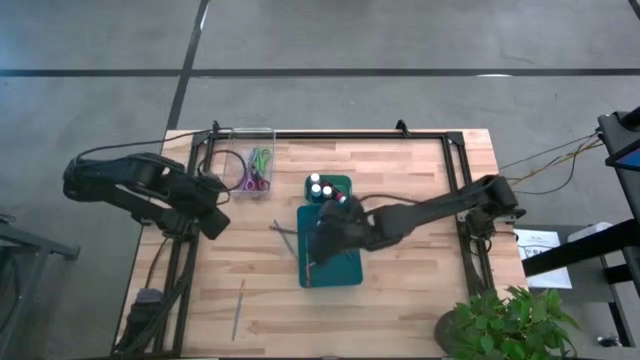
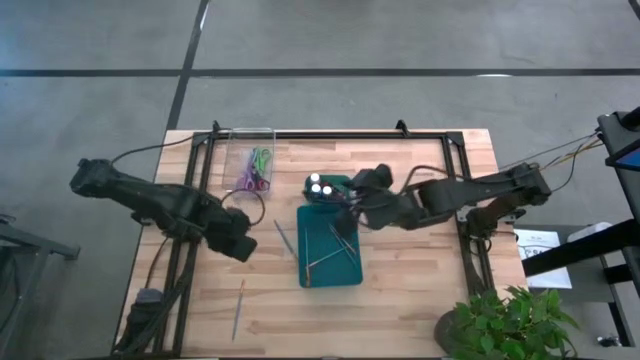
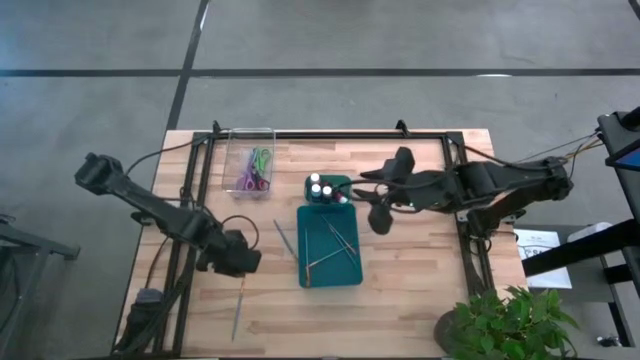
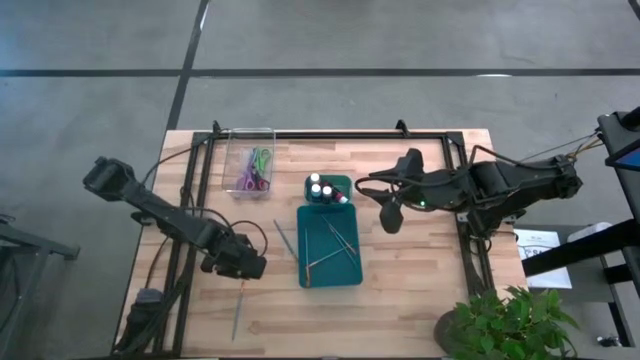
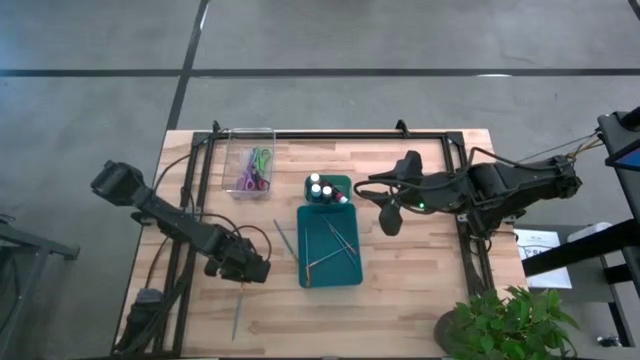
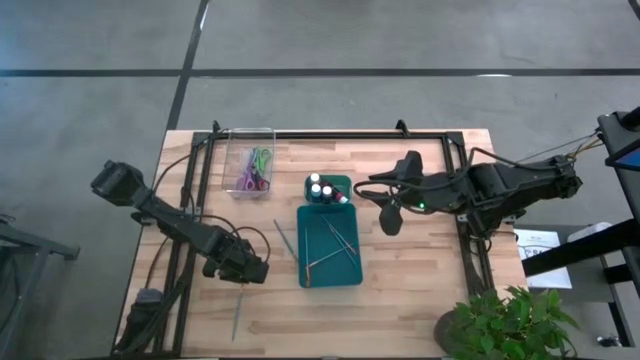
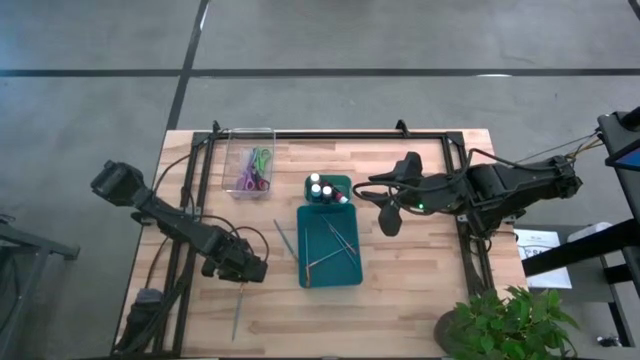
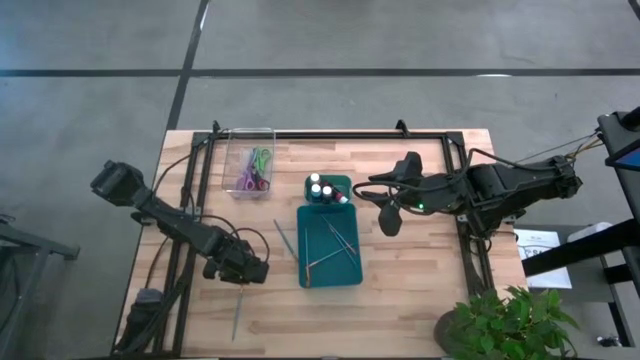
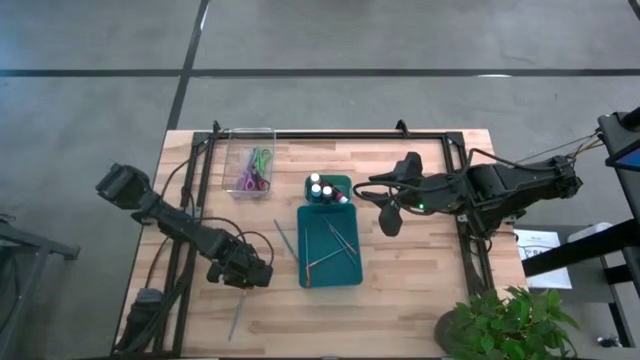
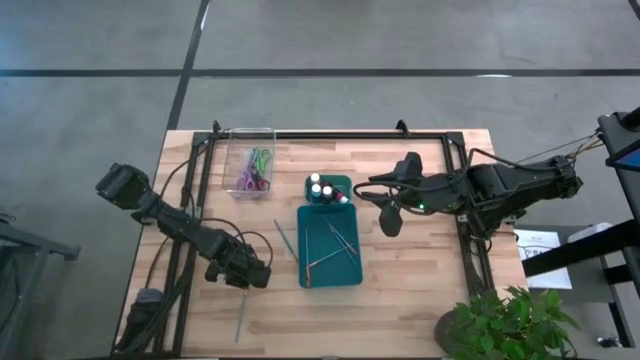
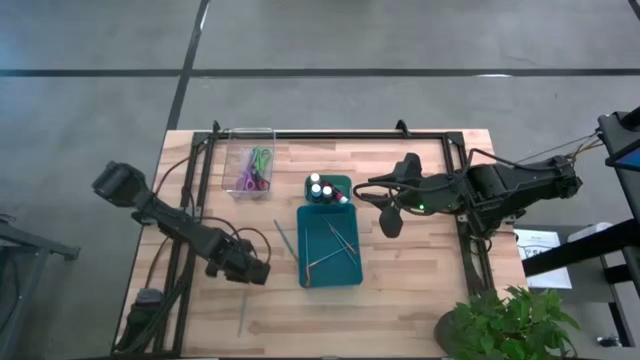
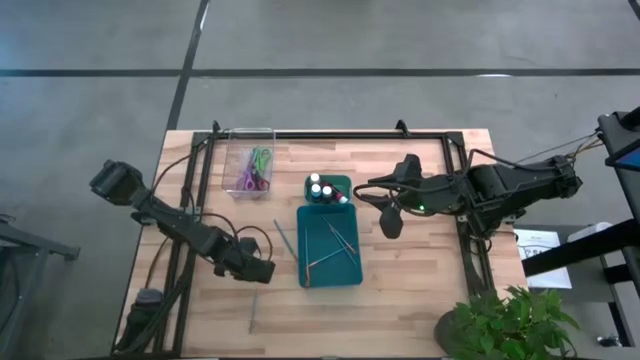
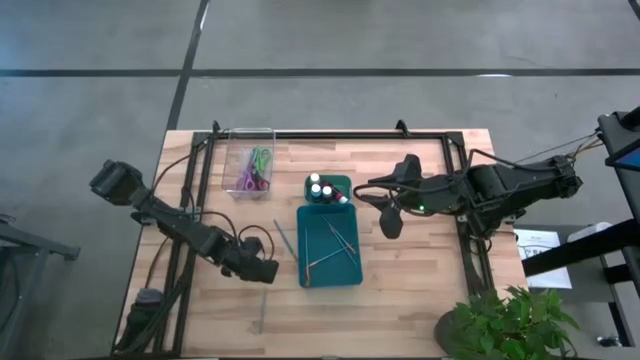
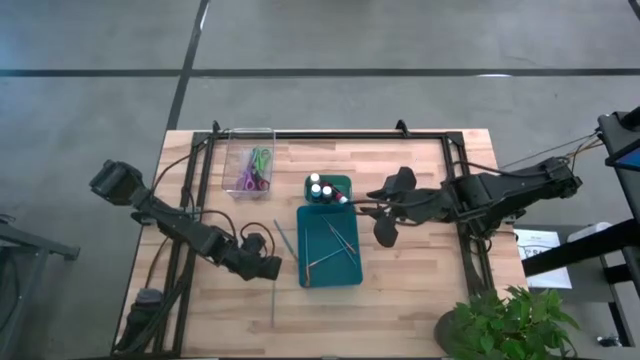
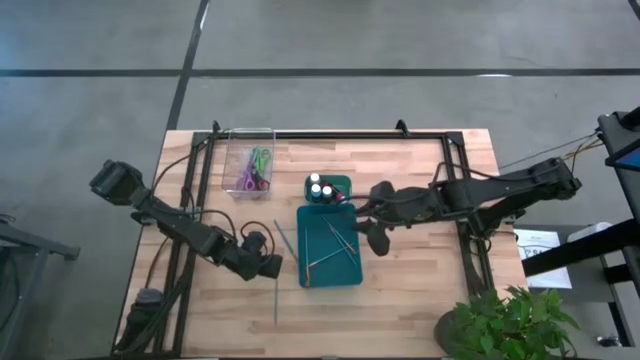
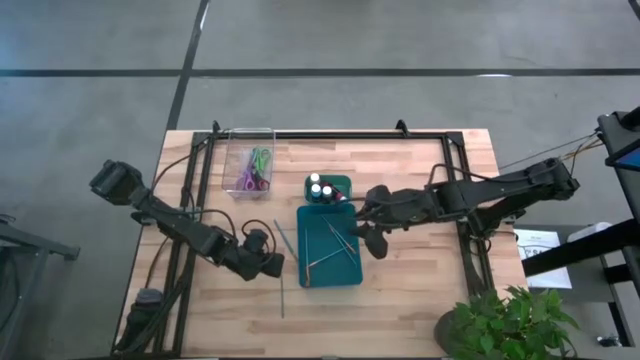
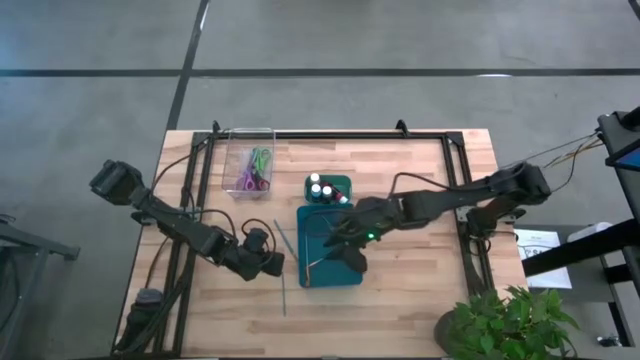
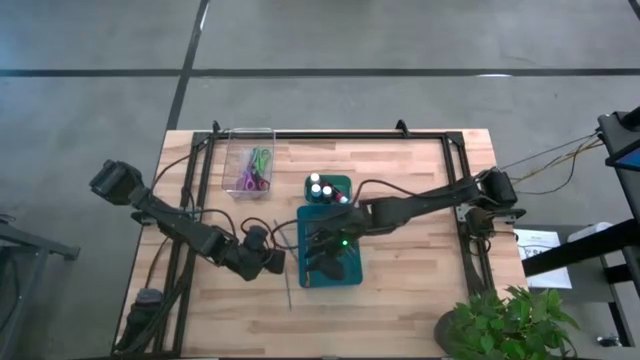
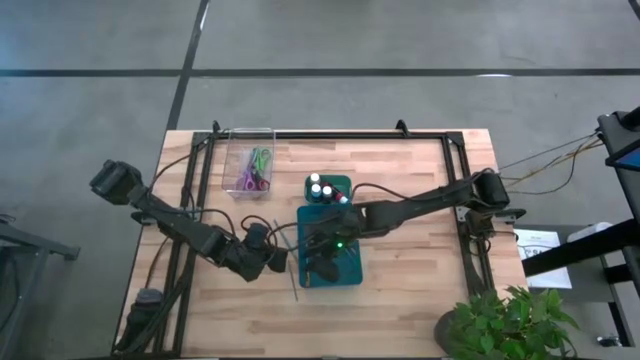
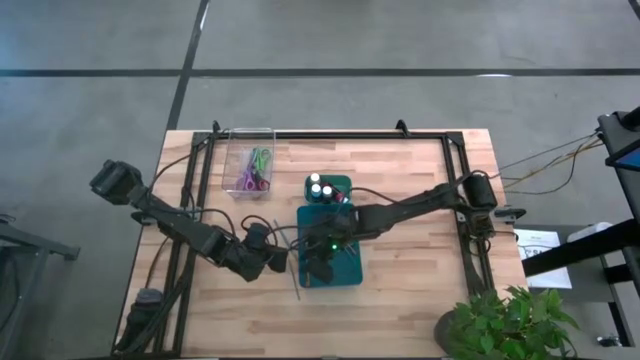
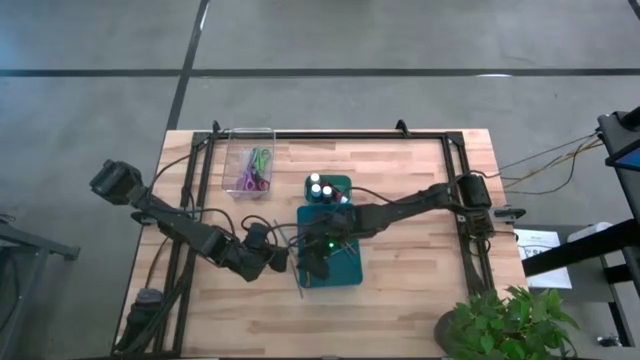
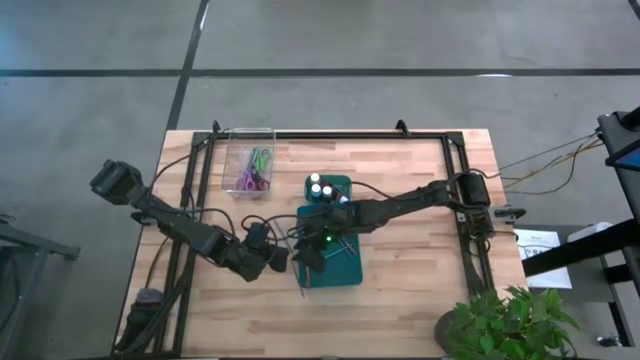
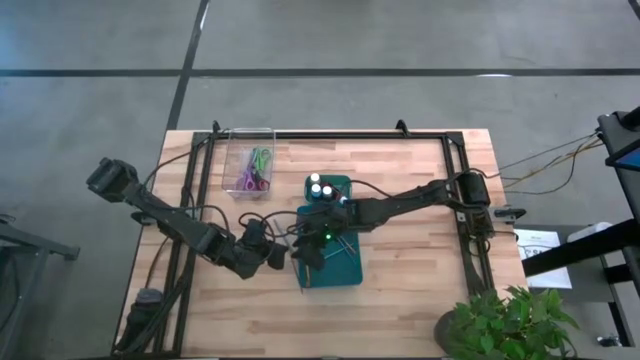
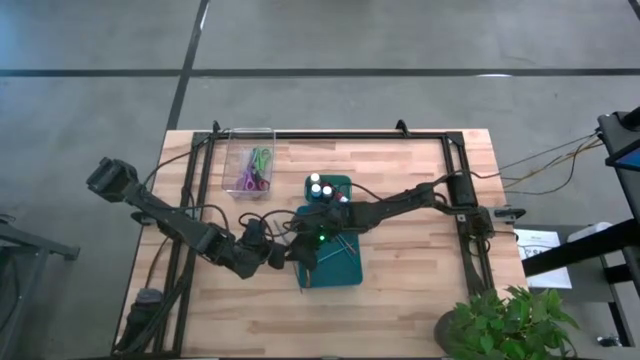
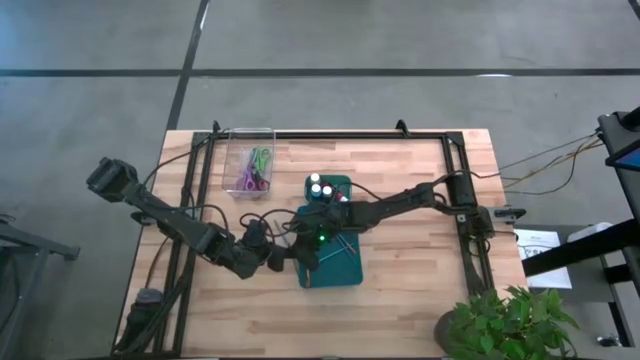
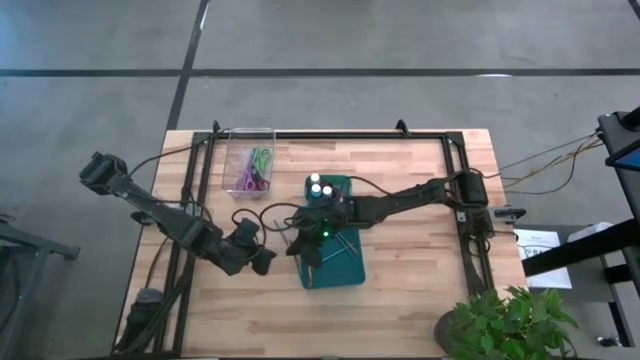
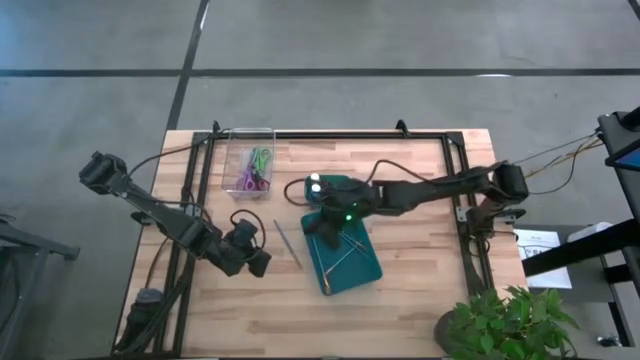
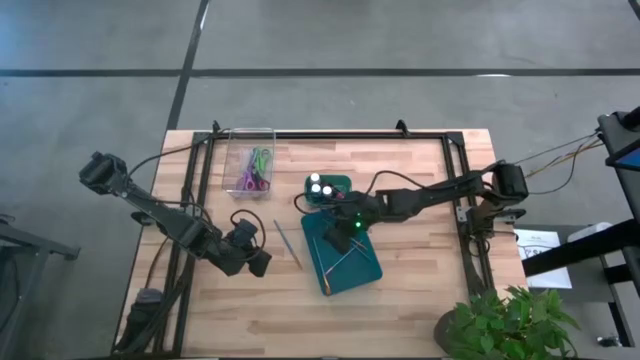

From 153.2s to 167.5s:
Task: Pick & Place Paint Supplies
Put the blue paintbrush into the blue bin

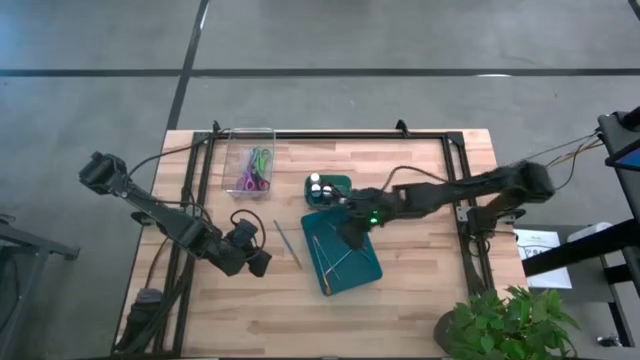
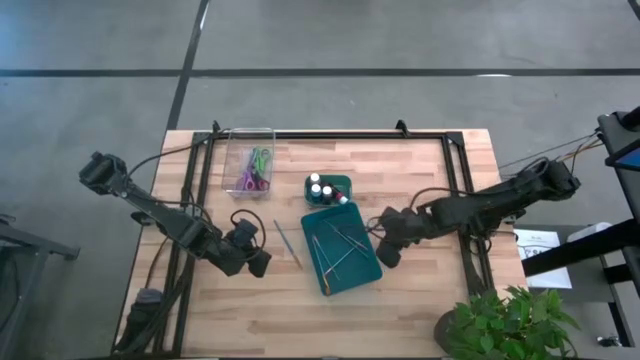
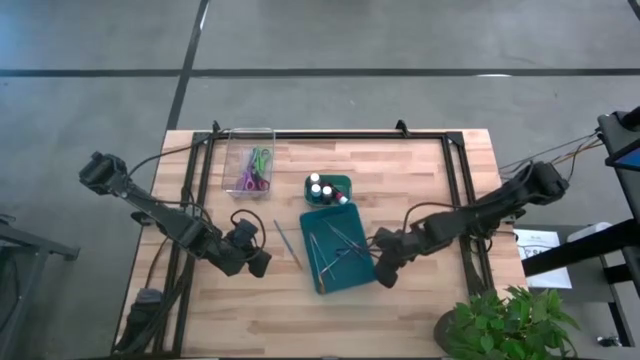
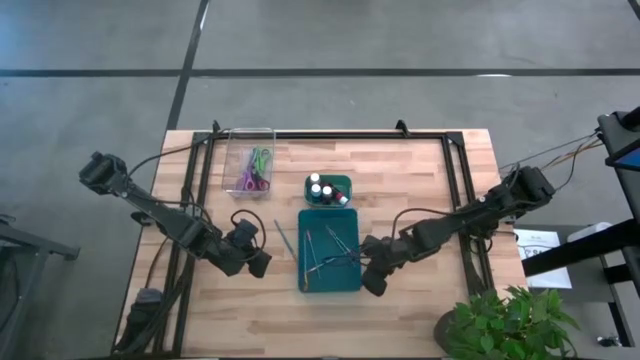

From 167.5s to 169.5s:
Adjust the blue bin

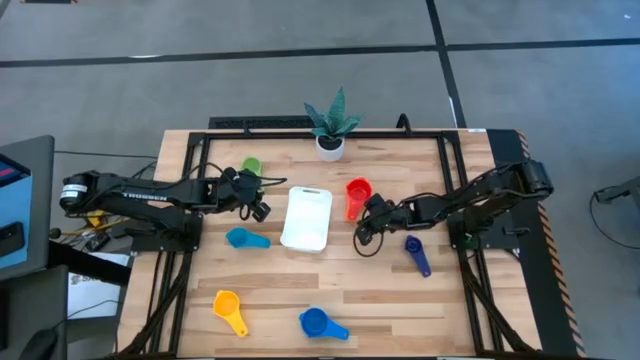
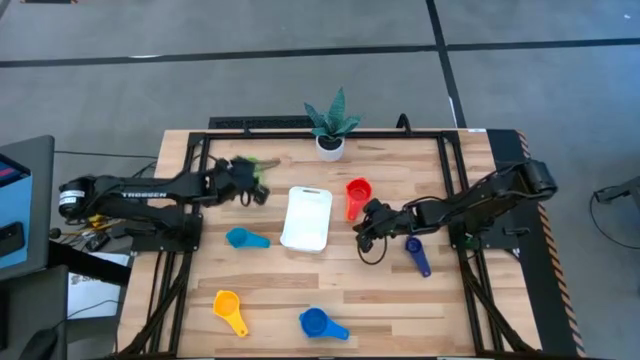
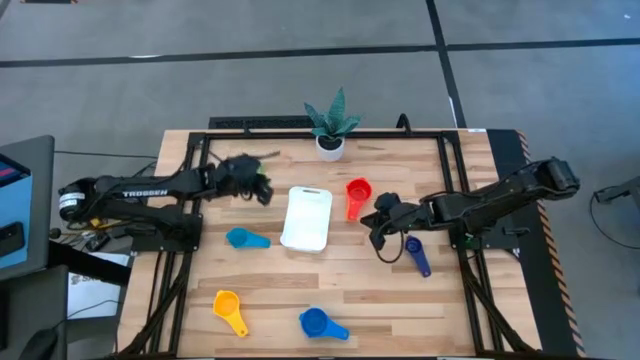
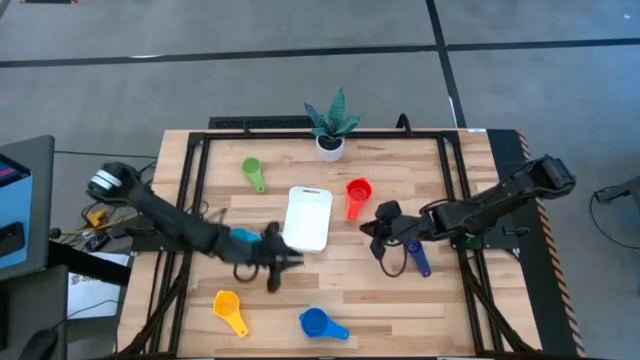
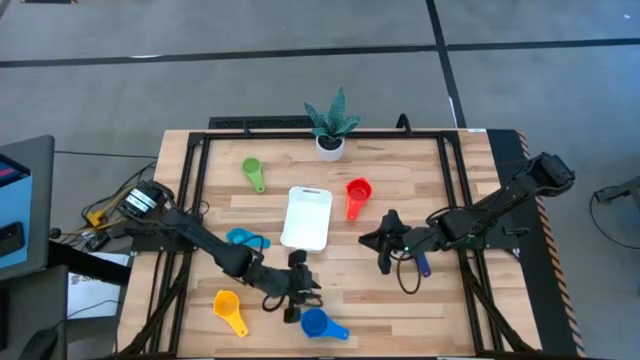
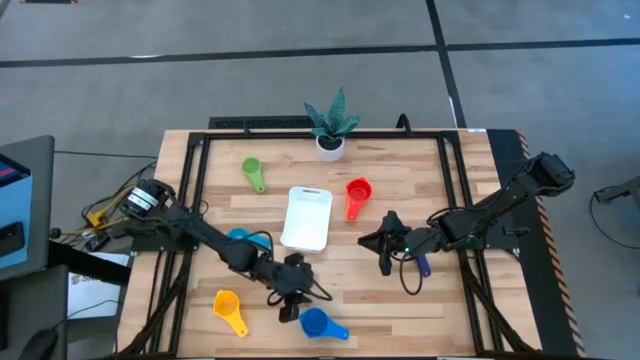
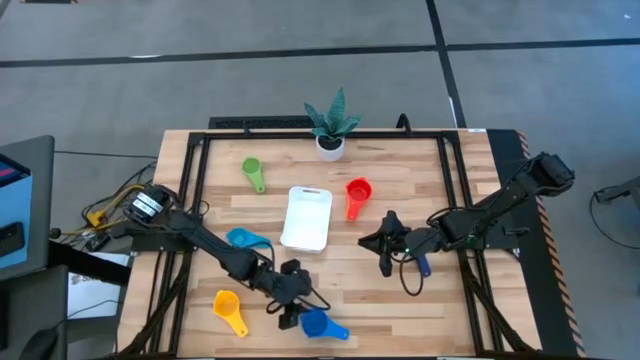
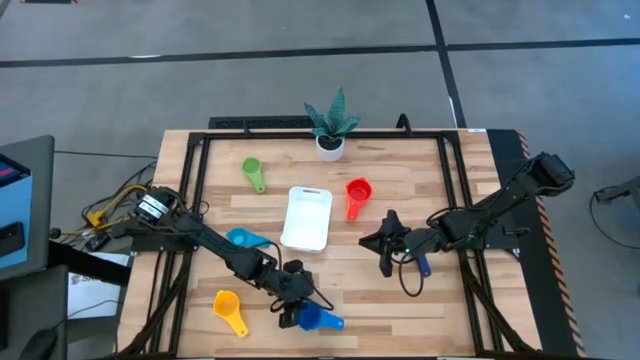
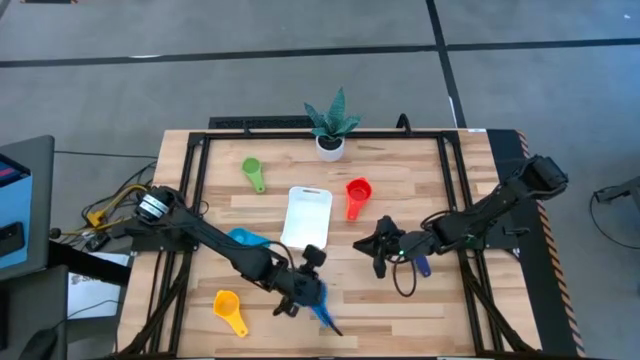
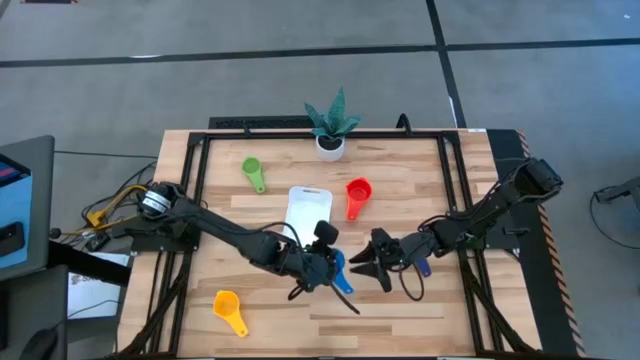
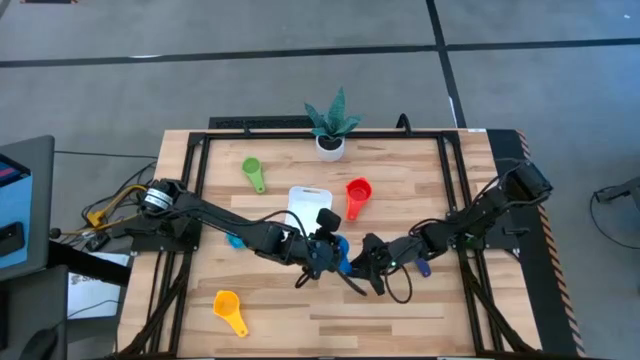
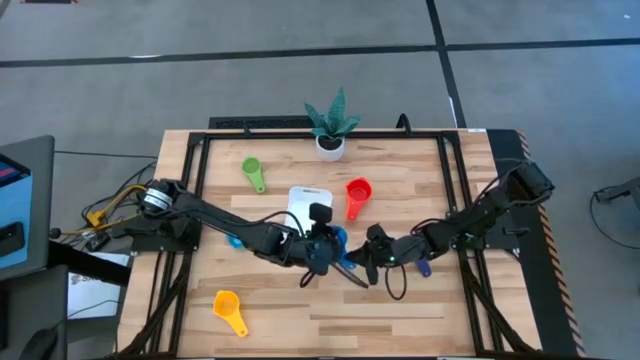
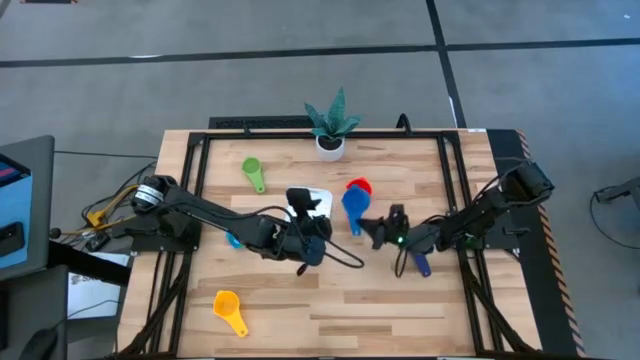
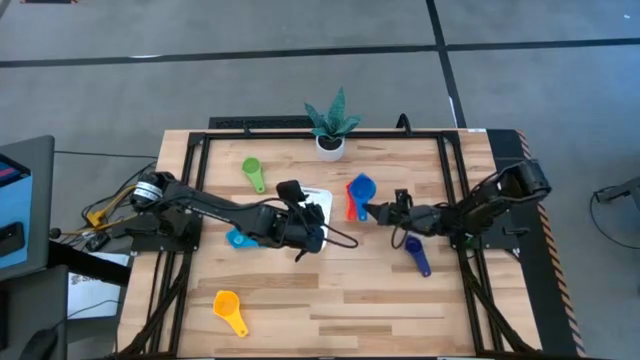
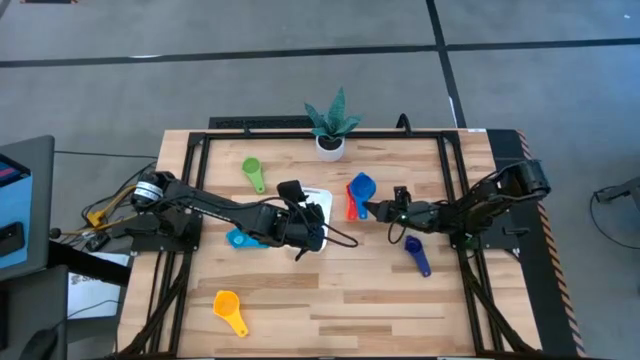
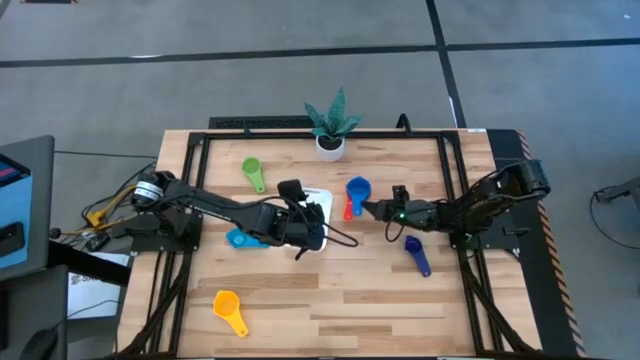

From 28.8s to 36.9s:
Task: Nest measuring cups in basket
Stack the blue measuring cup on top of the red measuring cup
